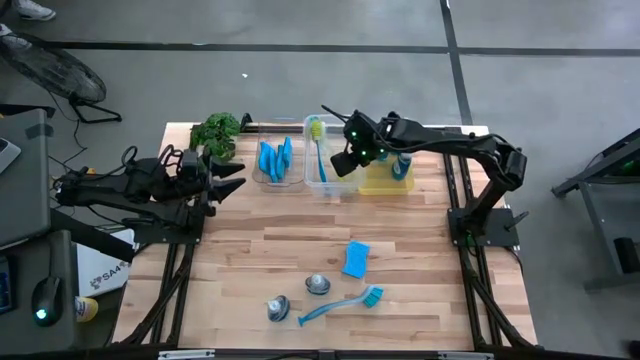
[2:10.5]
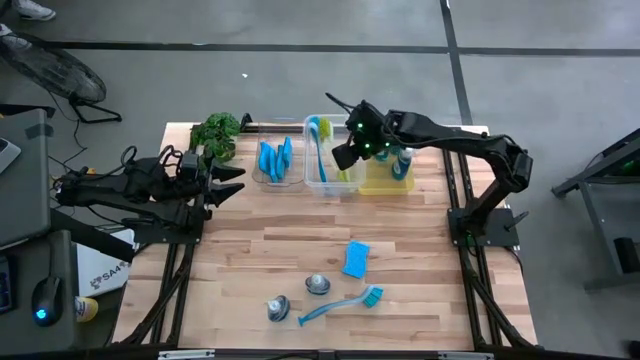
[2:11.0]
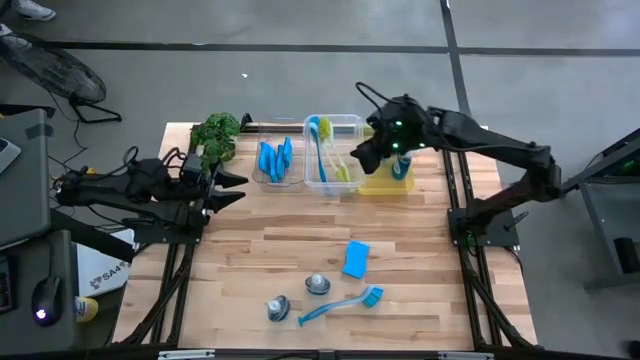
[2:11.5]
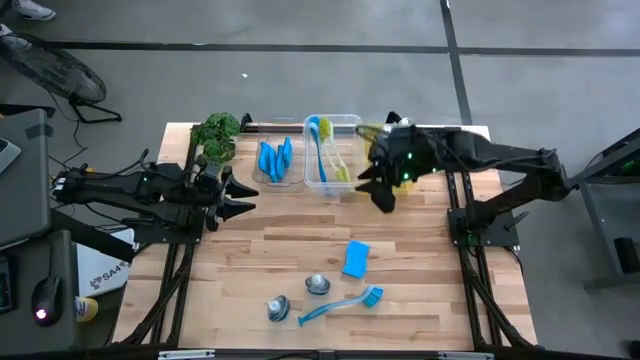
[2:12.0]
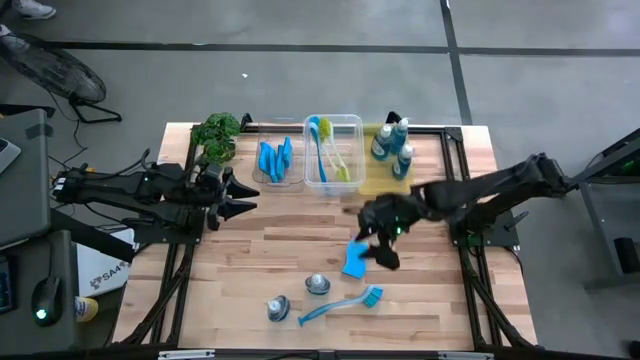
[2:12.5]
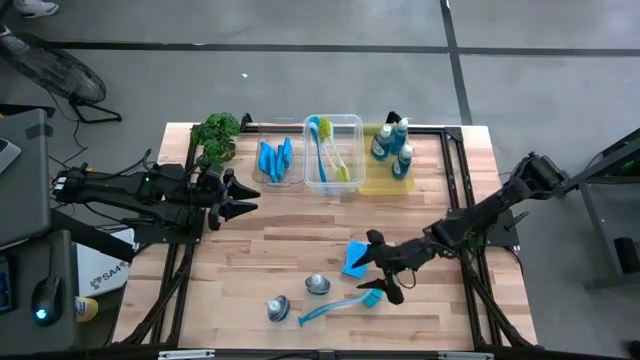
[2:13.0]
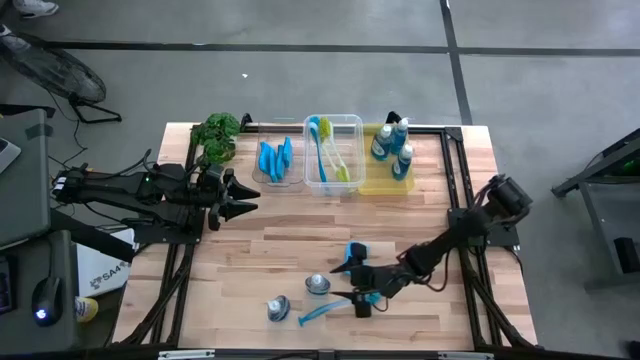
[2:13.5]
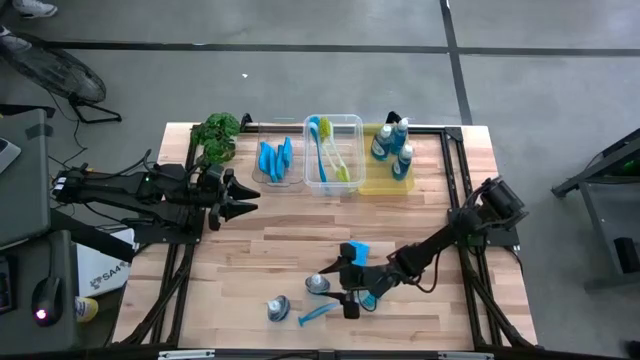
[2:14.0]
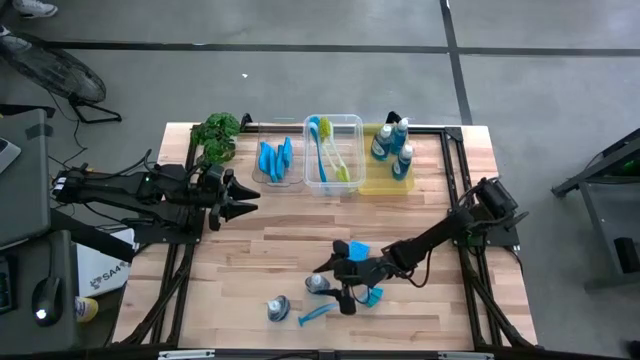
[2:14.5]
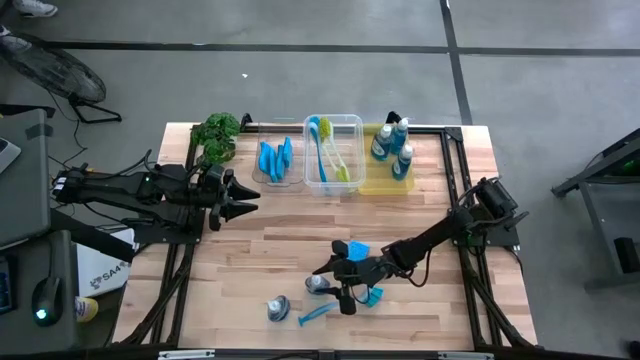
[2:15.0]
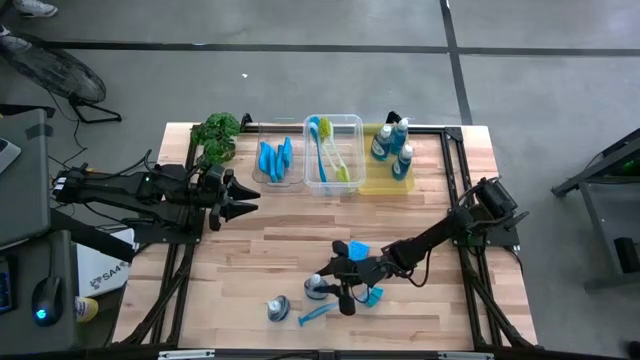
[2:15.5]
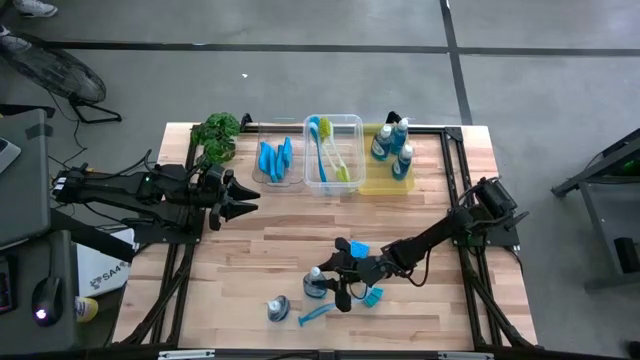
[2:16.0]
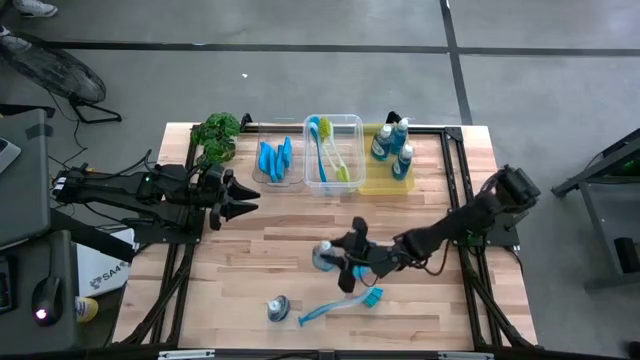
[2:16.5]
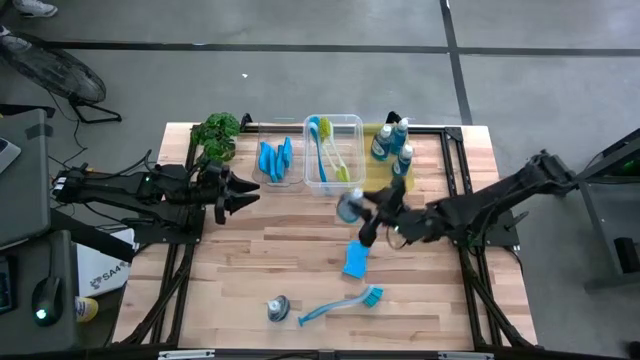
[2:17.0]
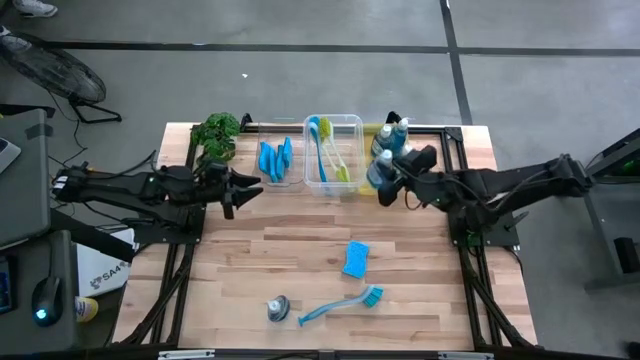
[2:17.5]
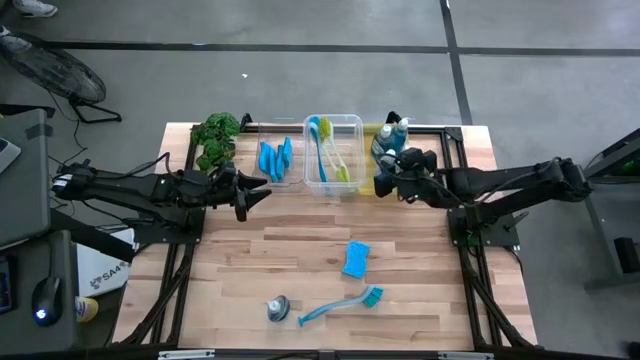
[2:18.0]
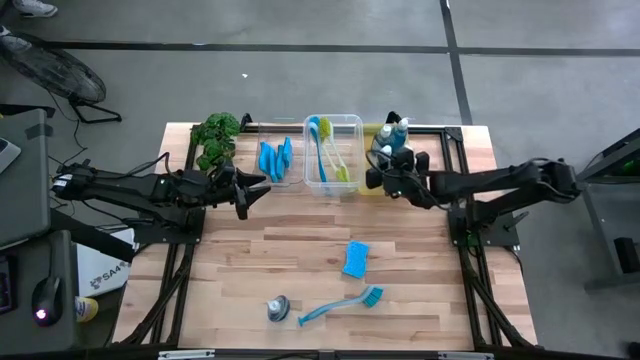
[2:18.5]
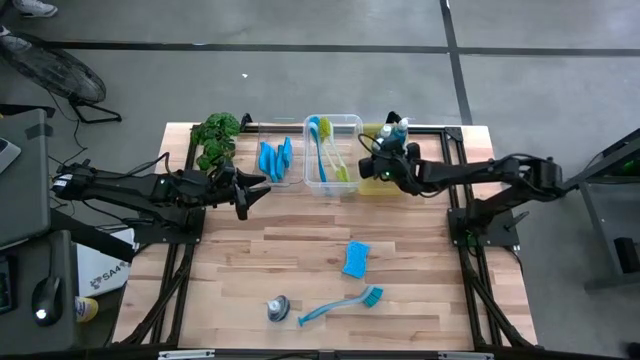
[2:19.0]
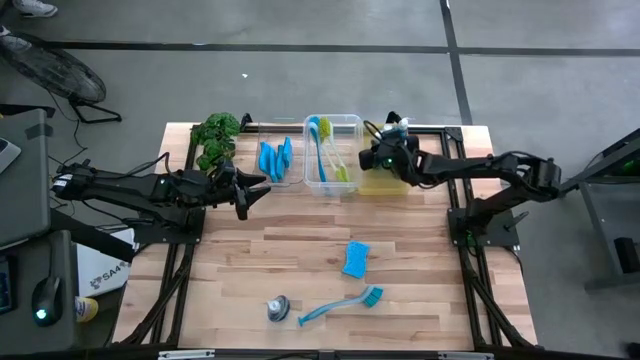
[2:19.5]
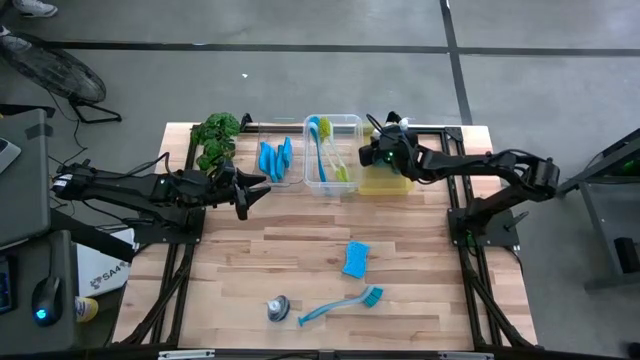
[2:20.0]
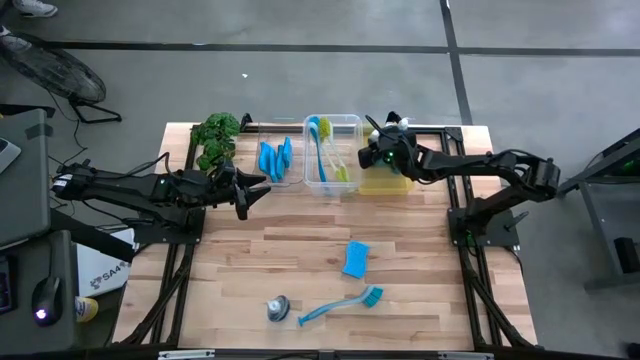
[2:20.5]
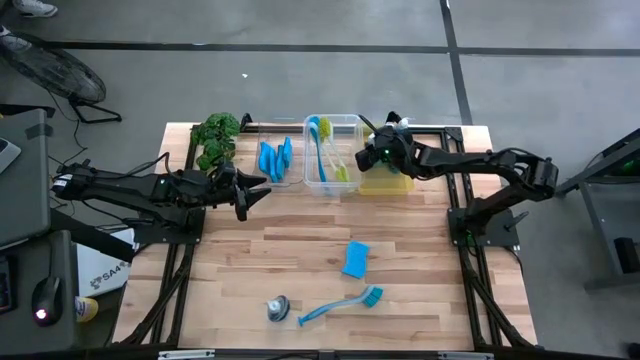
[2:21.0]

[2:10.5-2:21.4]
Task: Pick & Place Kitchen Sink Supplies
Put the right dishwashing liquid into the yellow bin

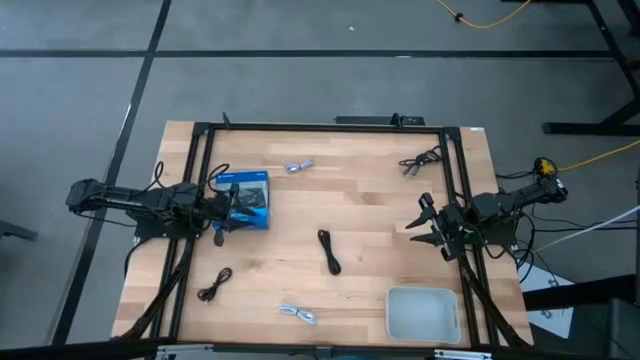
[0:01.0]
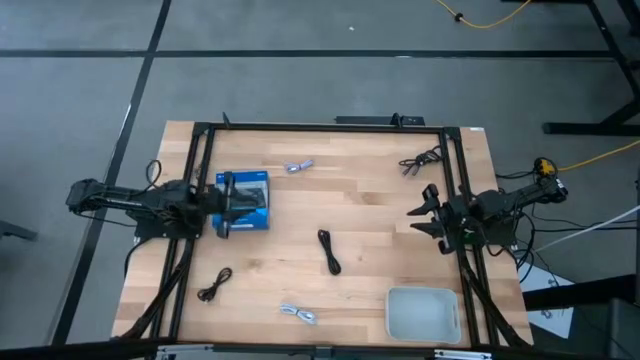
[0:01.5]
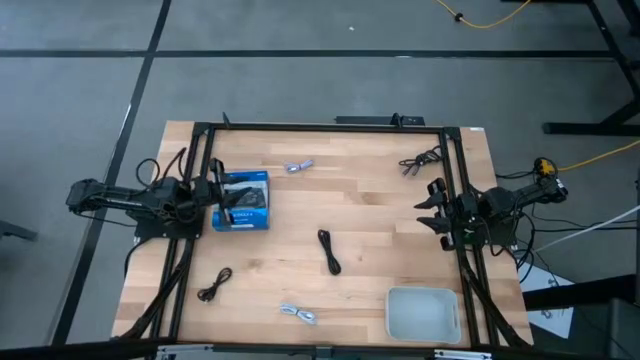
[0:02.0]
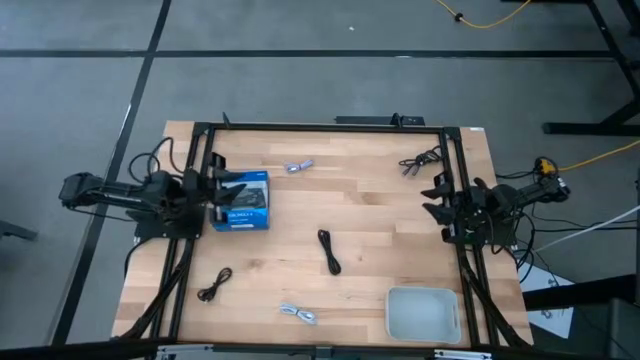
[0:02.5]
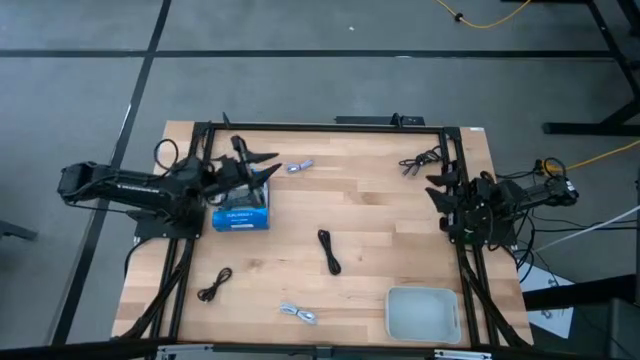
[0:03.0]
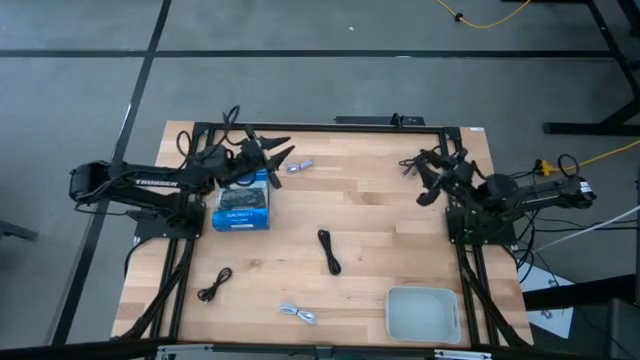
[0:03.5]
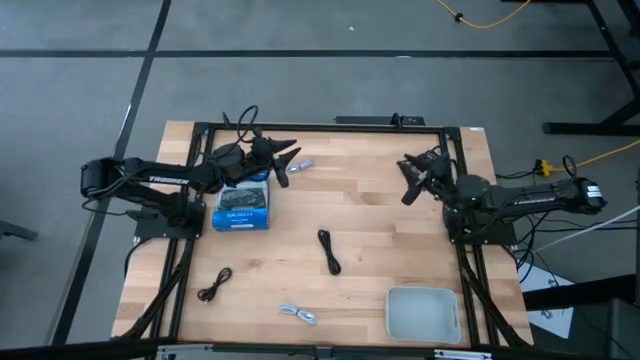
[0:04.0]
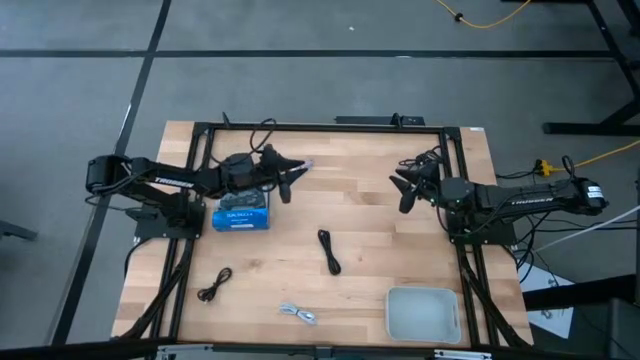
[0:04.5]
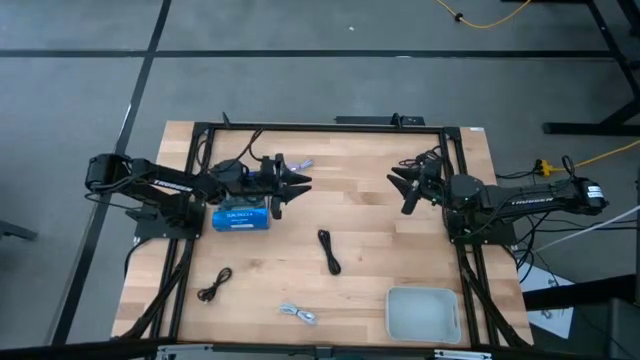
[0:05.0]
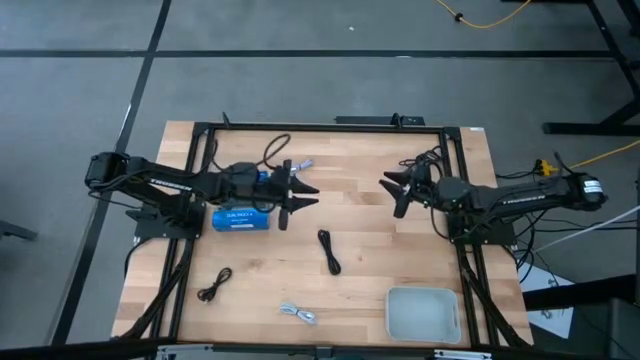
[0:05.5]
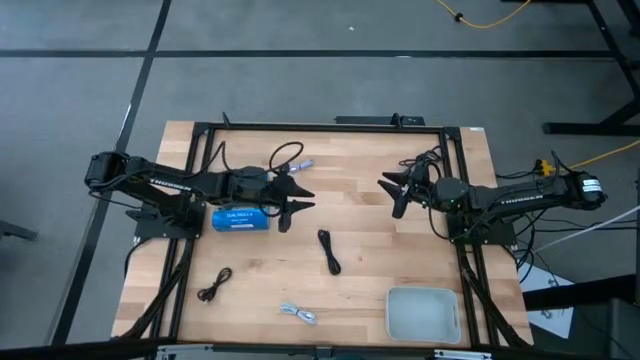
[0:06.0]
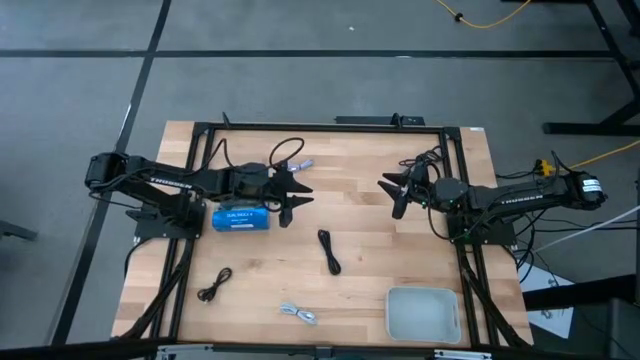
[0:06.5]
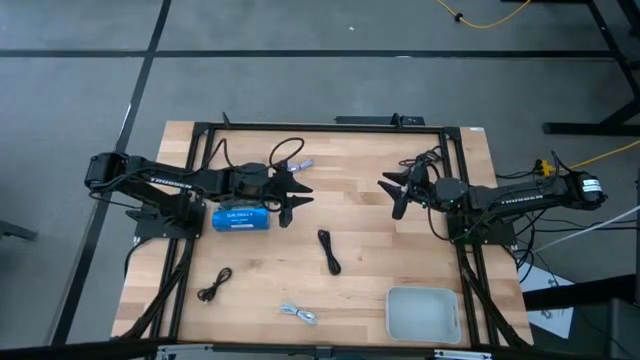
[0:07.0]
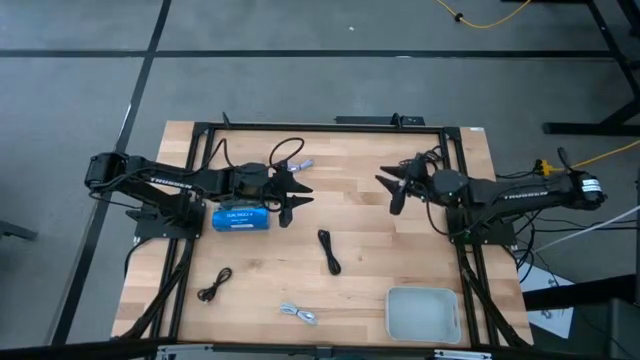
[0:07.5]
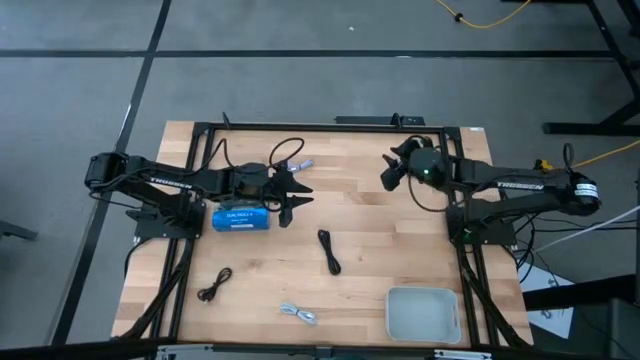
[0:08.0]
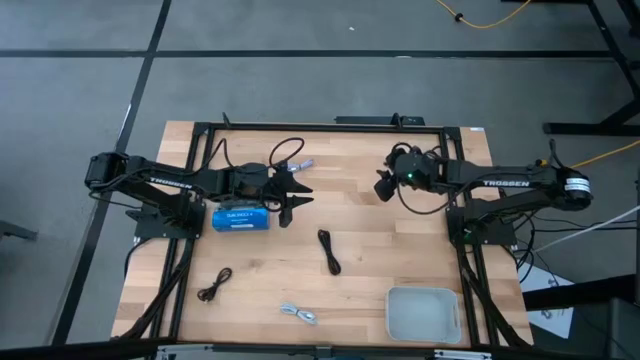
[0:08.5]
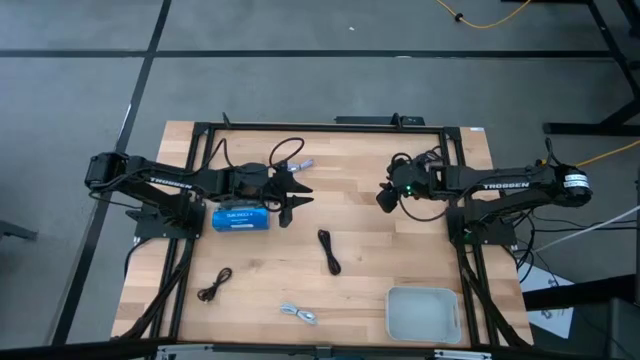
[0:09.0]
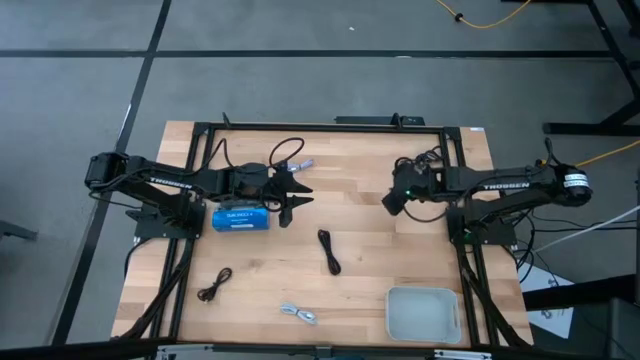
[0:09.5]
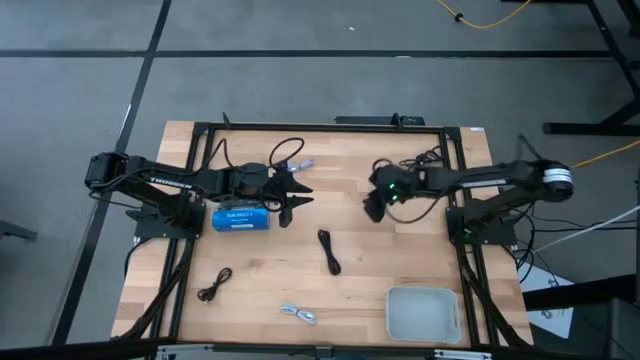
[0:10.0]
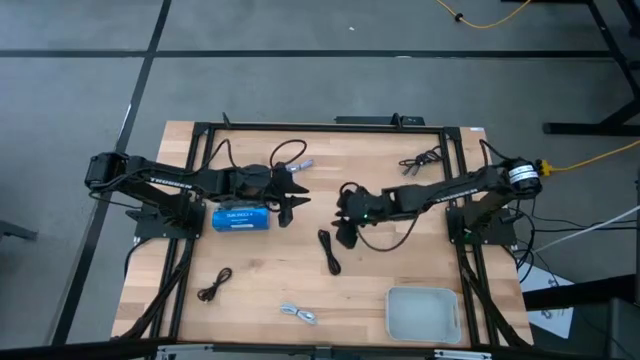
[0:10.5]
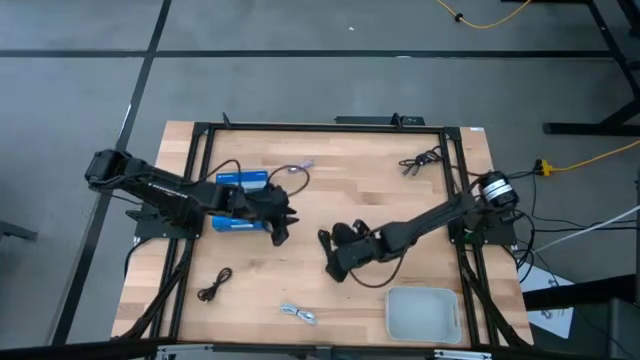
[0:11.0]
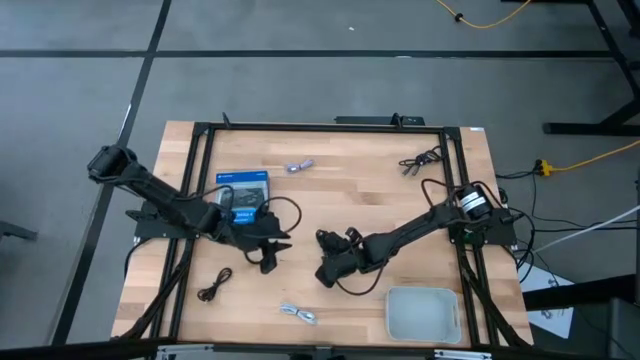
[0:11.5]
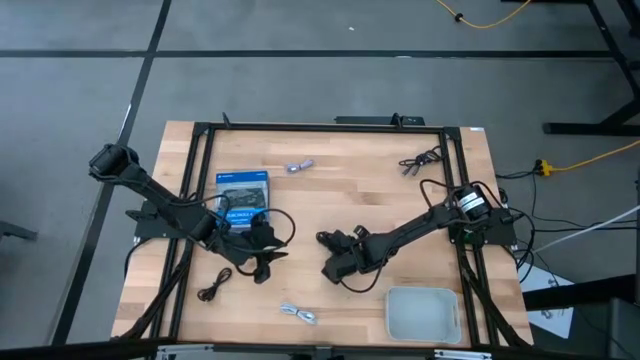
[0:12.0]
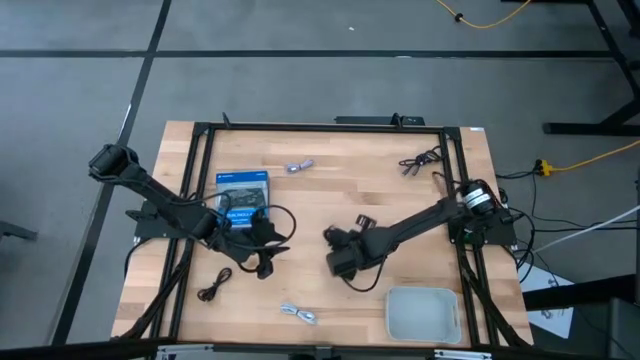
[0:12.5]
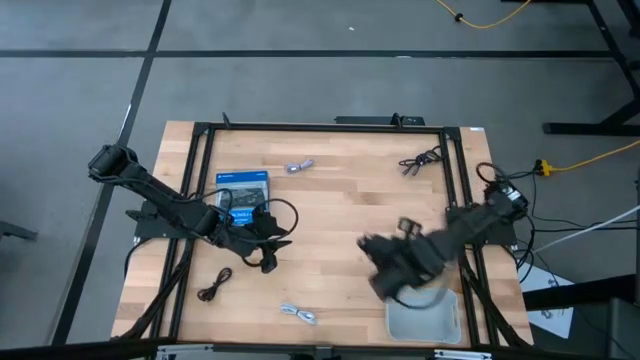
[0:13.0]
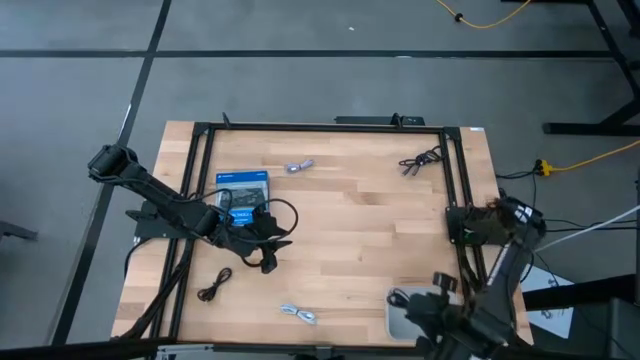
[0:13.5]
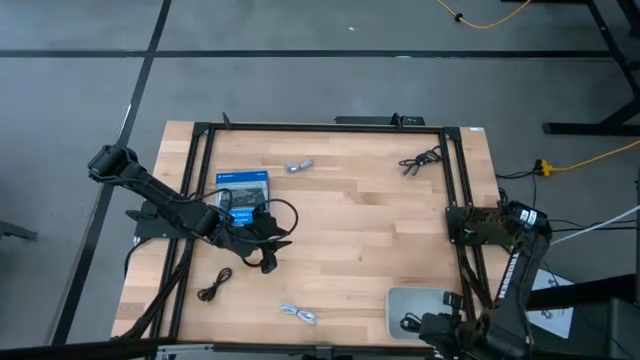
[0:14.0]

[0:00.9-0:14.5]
Task: Pick and place USB-C Cables
Put the middle black charger cable into the white bin
